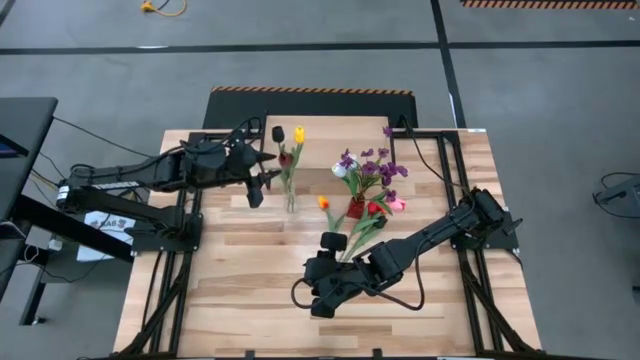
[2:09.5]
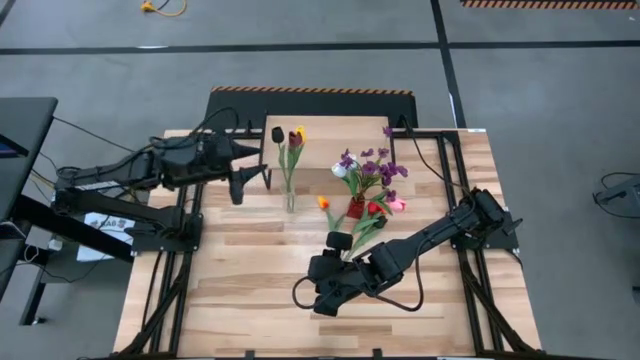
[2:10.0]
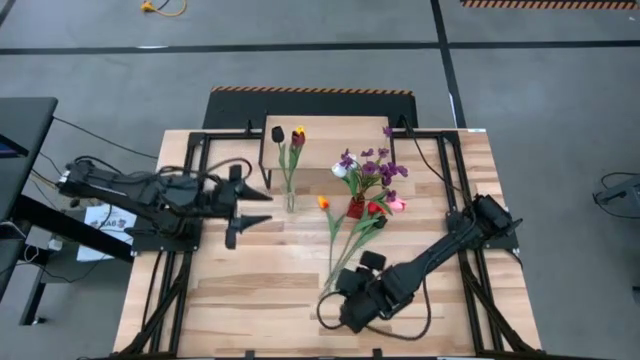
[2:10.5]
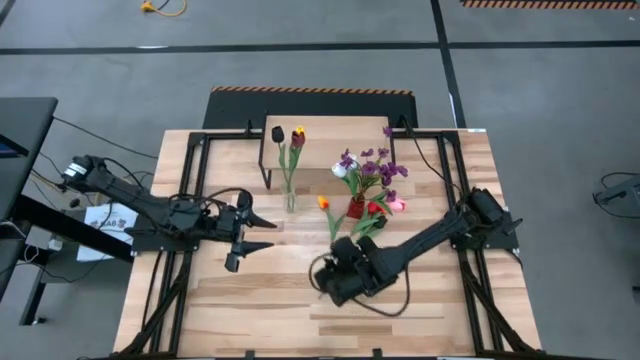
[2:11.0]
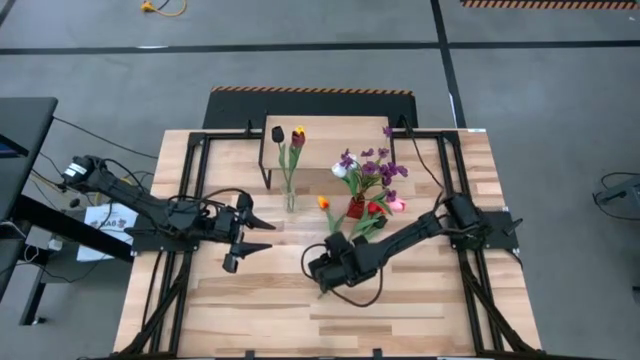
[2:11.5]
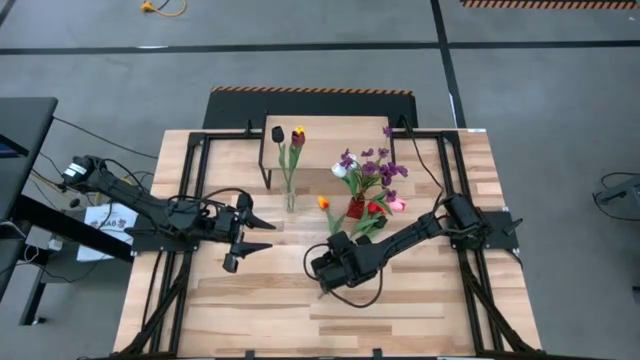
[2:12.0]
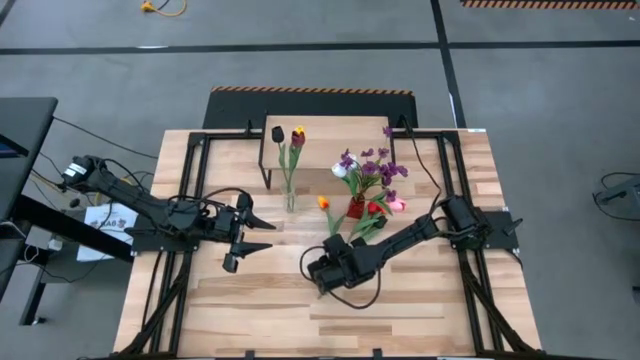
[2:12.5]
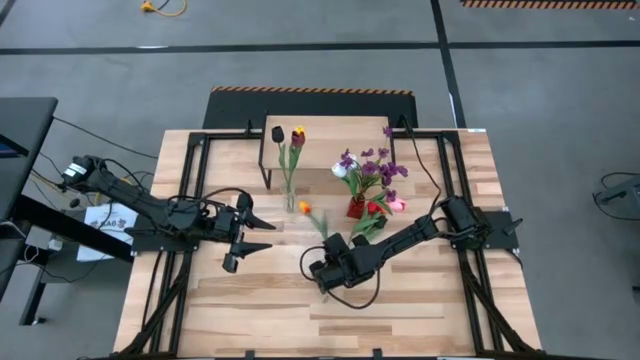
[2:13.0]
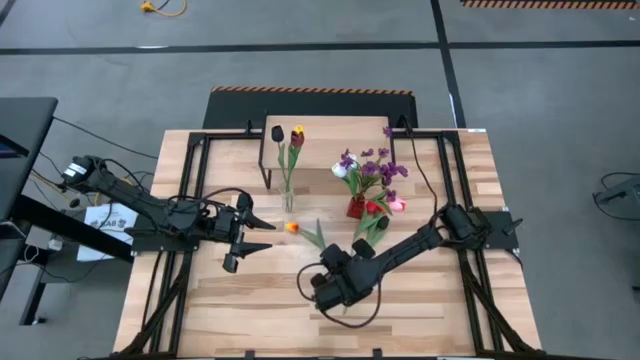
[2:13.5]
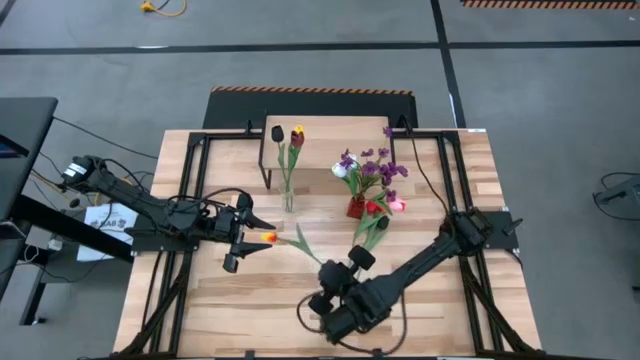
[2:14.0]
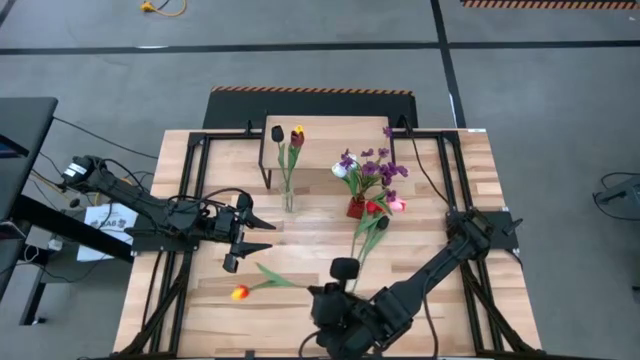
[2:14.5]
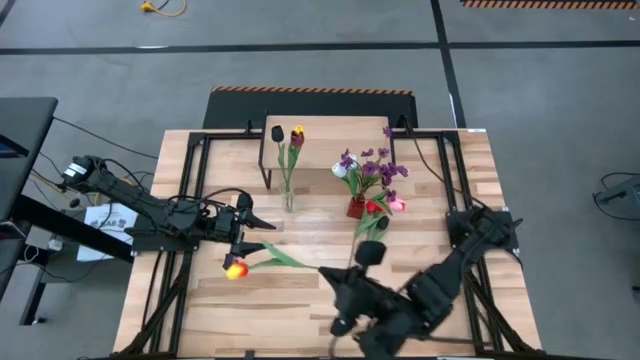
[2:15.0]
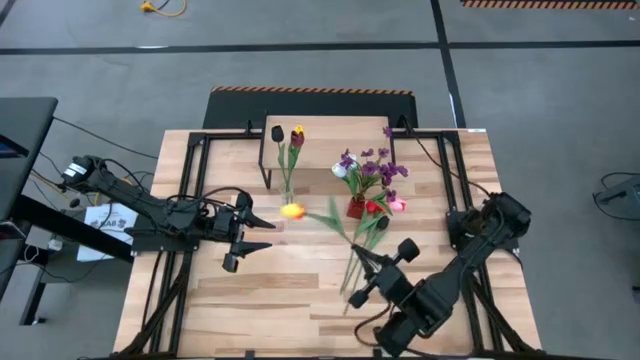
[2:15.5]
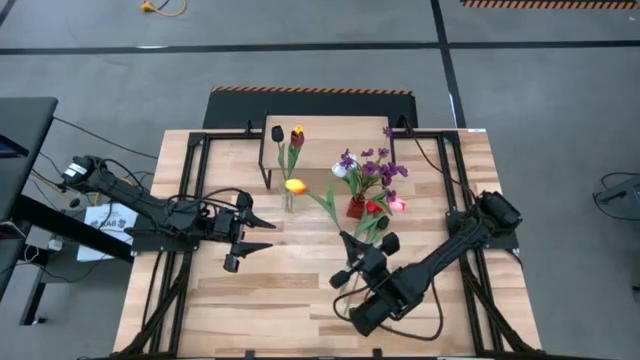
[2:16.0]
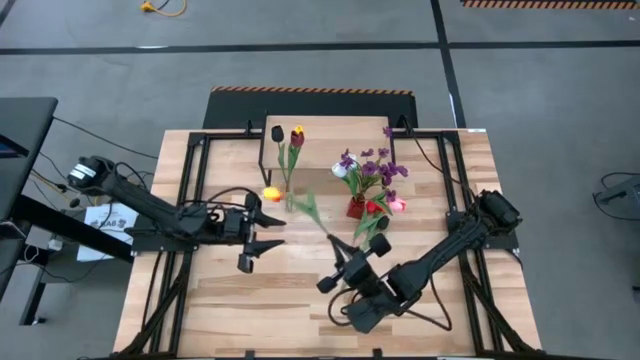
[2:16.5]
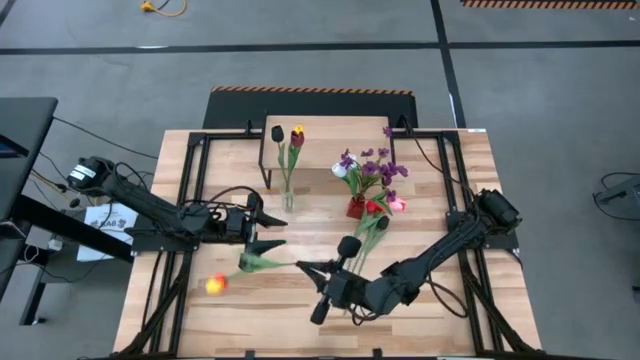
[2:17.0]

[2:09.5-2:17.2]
Task: Pick and place flowers into a vace then onto a shelf
Put the yellow flower into the transparent vase

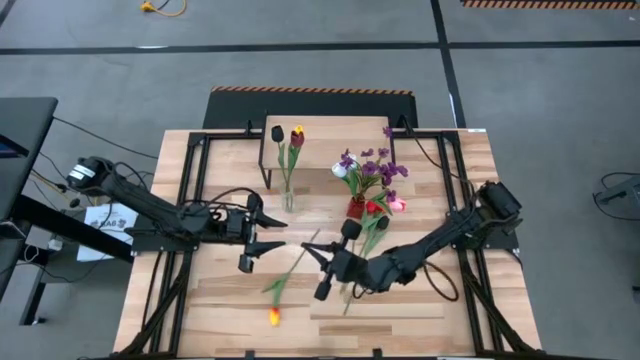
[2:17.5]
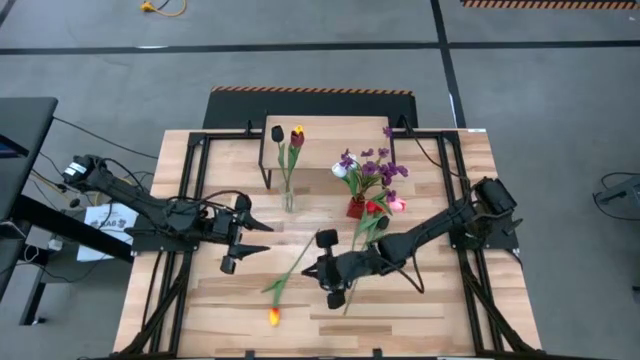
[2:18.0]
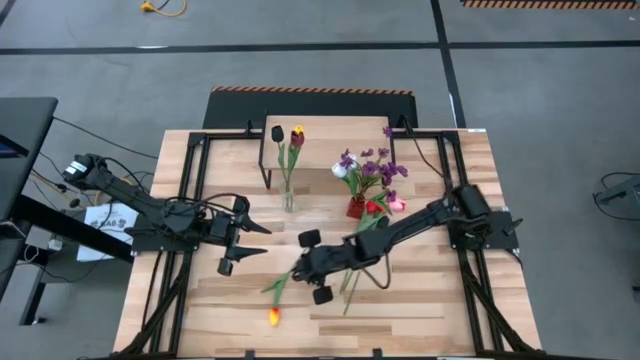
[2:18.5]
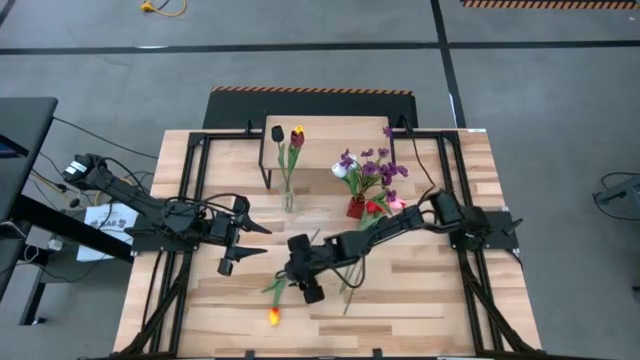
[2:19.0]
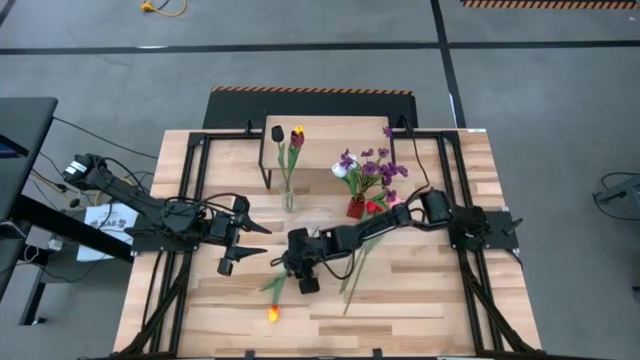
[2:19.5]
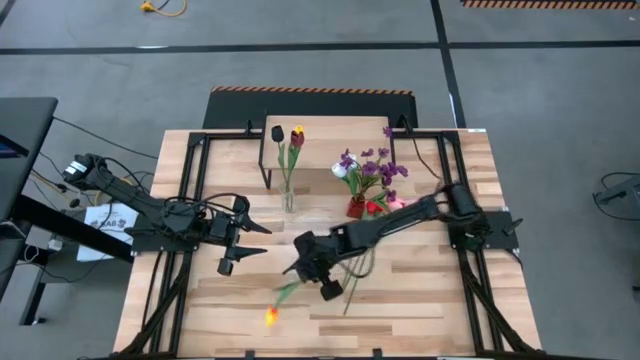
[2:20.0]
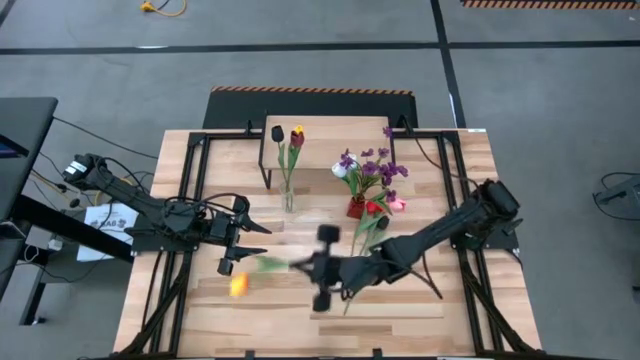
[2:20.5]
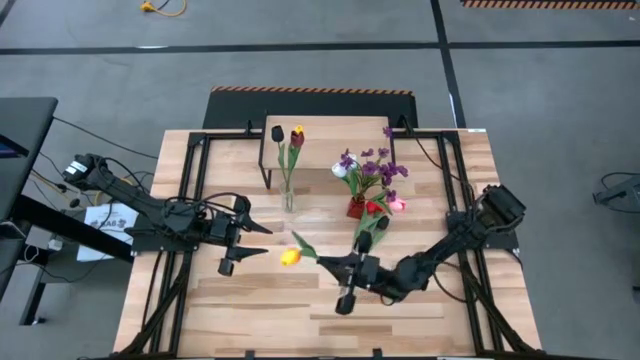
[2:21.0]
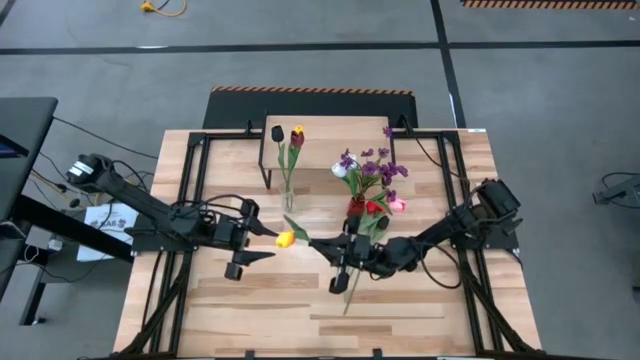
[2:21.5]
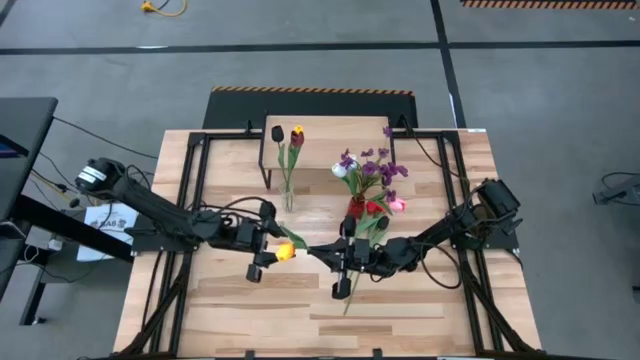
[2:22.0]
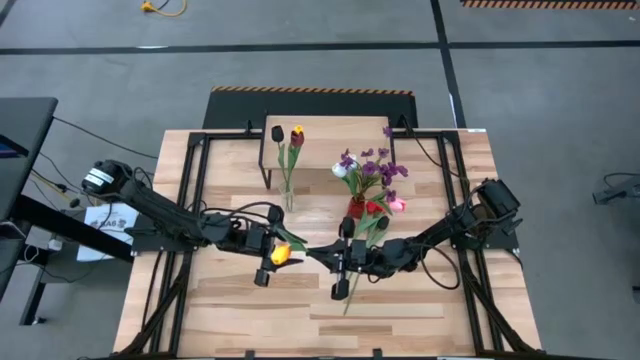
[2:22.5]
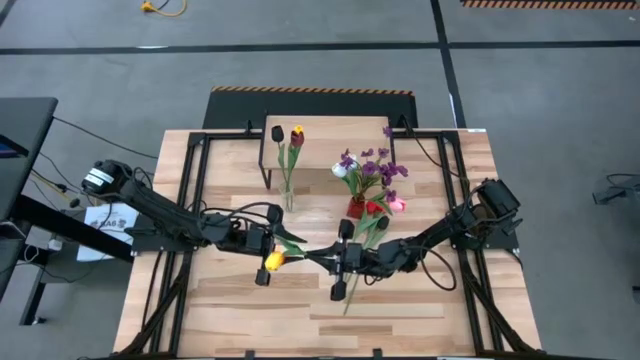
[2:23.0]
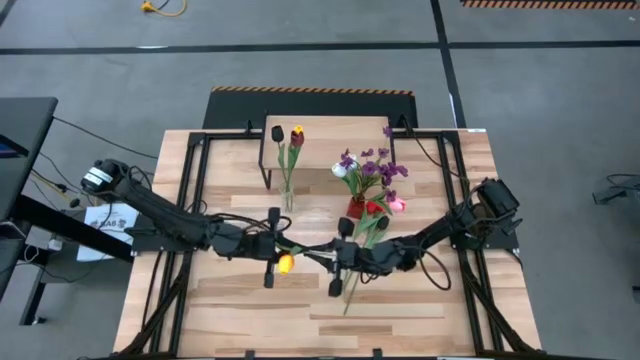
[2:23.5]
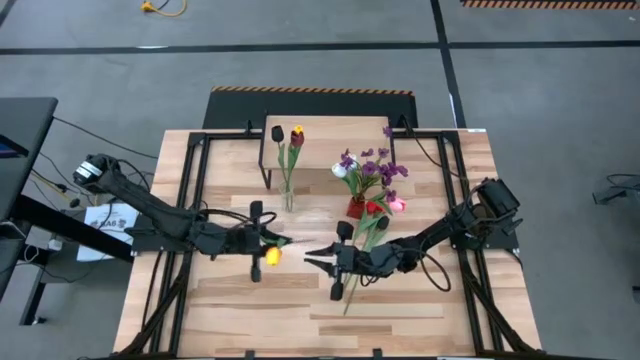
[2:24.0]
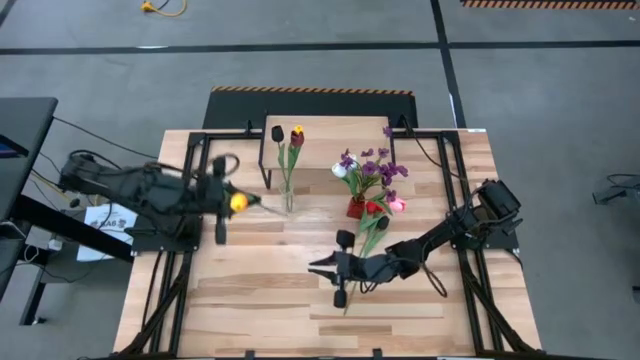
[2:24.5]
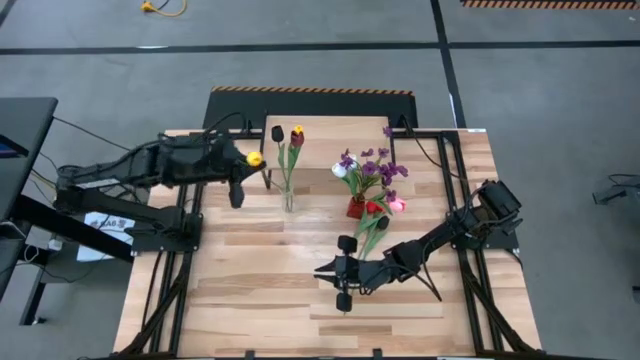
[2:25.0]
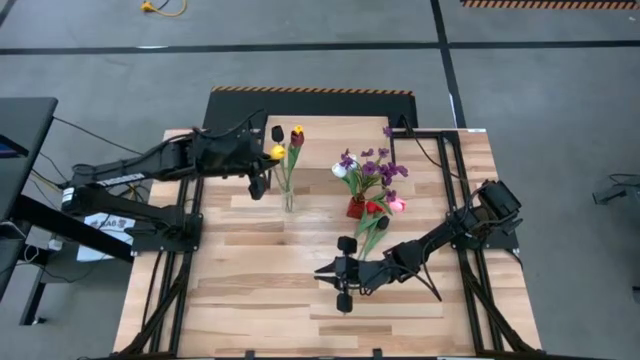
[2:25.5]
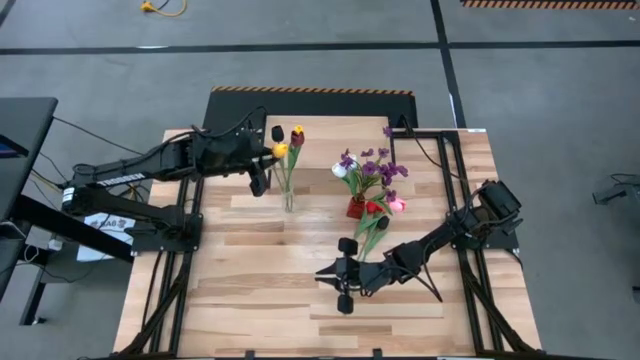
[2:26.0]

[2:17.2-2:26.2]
Put the yellow flower into the transparent vase

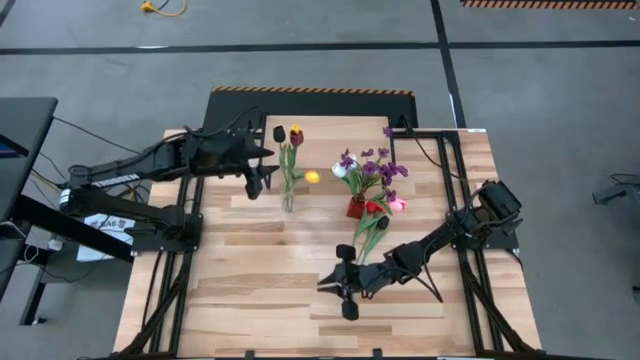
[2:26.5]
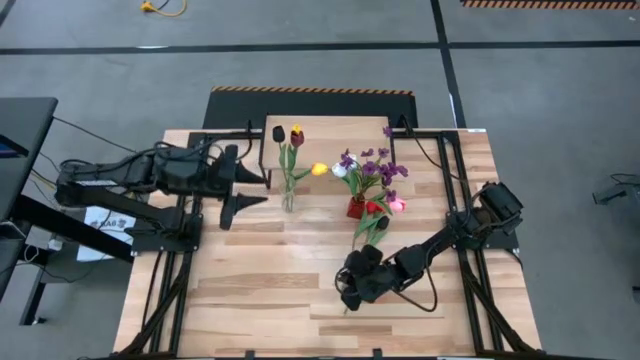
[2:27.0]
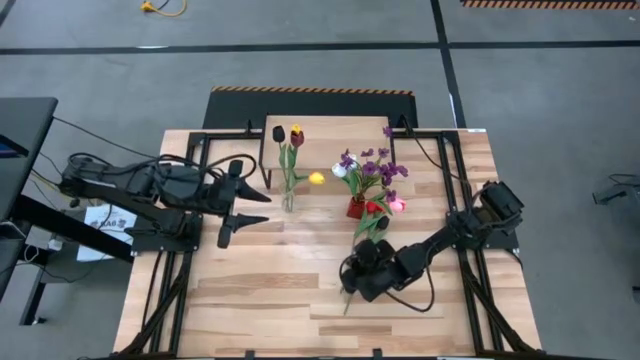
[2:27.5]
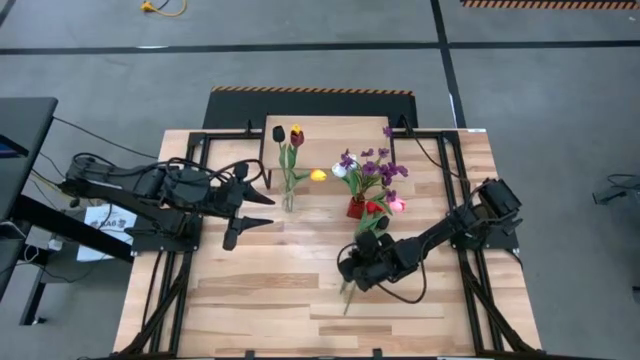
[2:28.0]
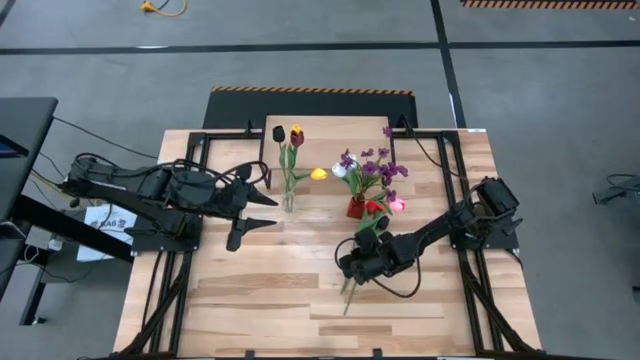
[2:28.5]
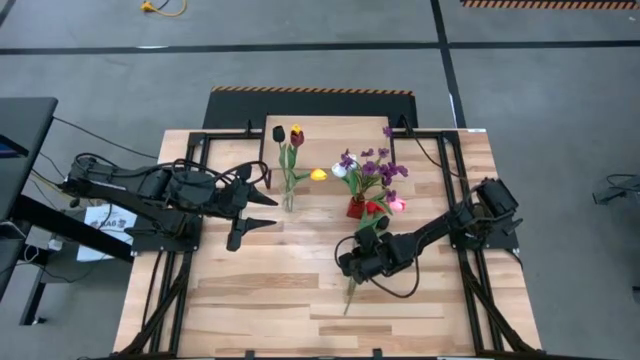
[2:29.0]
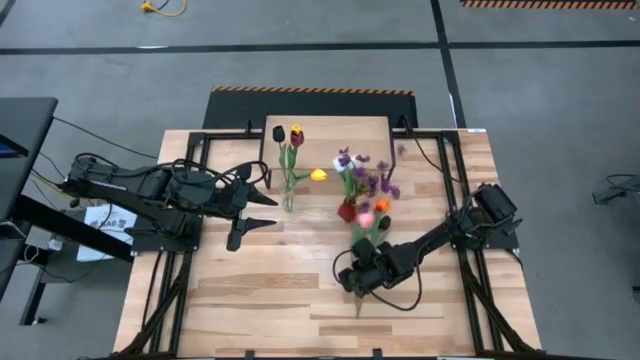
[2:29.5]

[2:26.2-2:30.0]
Put the red flower into the transparent vase

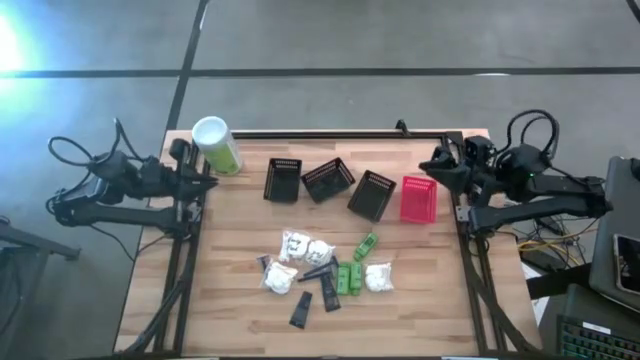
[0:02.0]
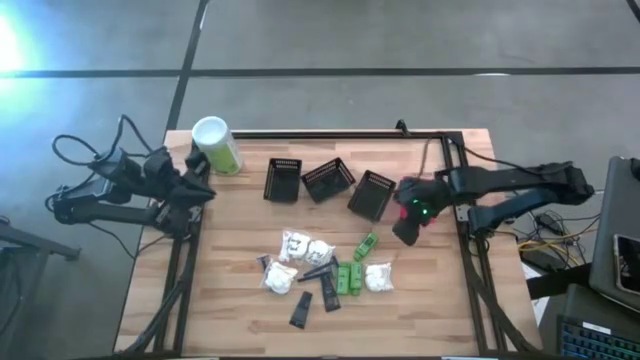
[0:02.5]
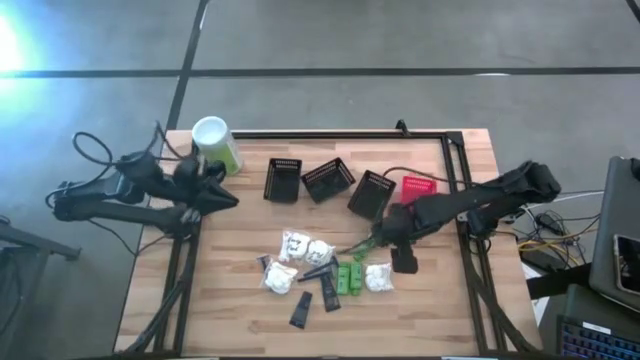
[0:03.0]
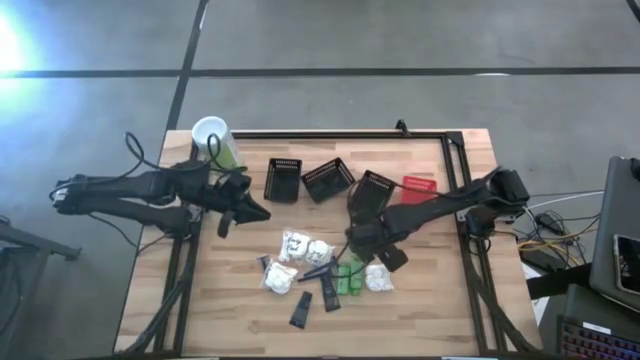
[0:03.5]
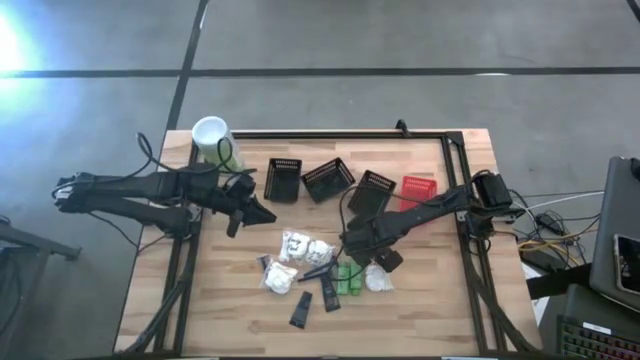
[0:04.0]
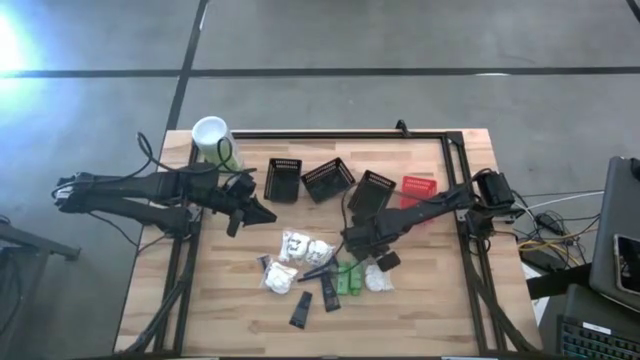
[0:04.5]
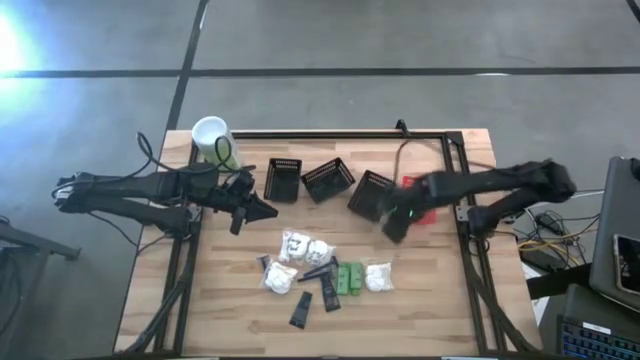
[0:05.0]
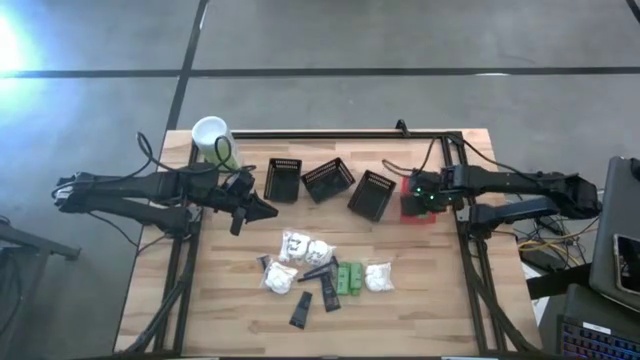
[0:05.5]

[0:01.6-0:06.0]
Task: Pick & Place Travel size toiletries
Put the top shampoo into the red bin
